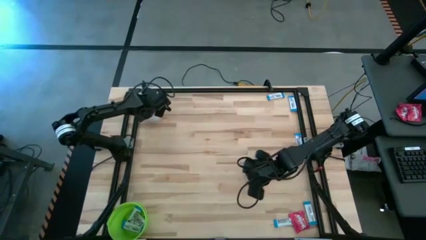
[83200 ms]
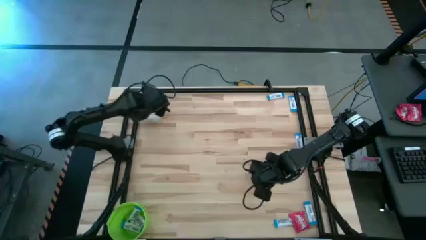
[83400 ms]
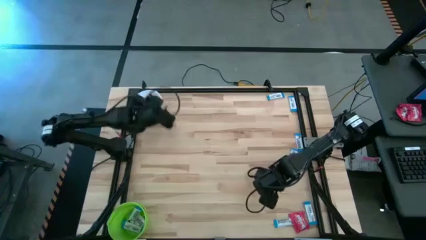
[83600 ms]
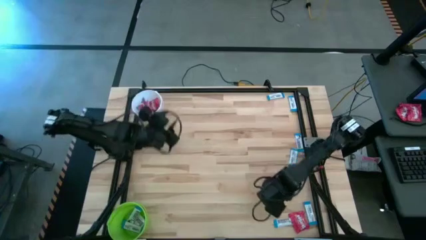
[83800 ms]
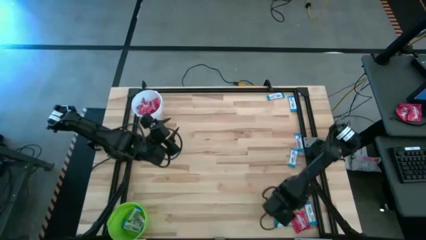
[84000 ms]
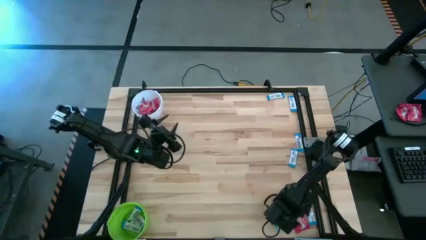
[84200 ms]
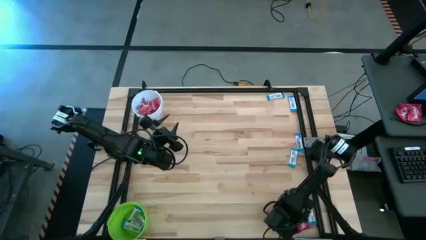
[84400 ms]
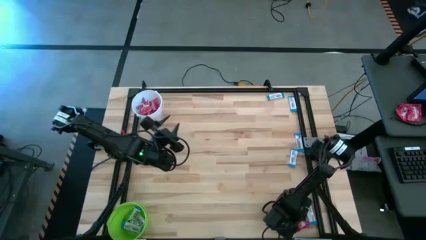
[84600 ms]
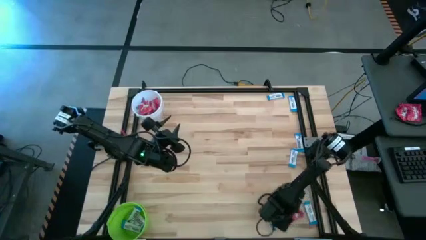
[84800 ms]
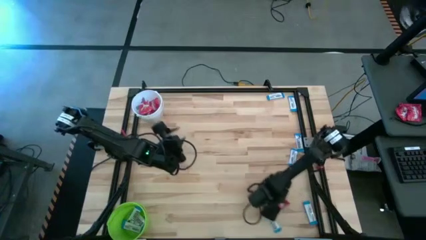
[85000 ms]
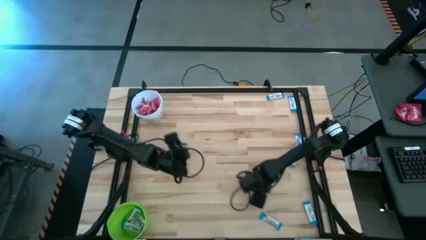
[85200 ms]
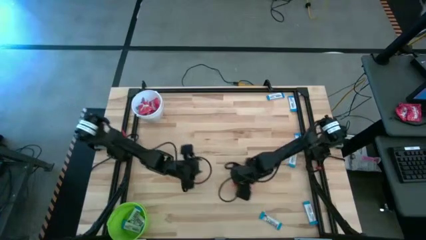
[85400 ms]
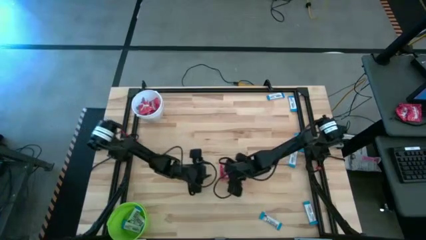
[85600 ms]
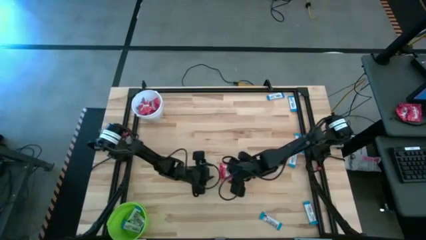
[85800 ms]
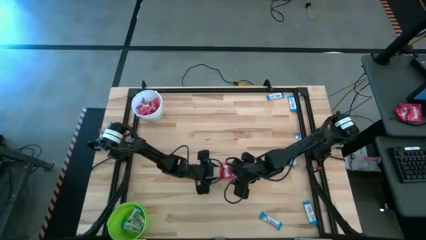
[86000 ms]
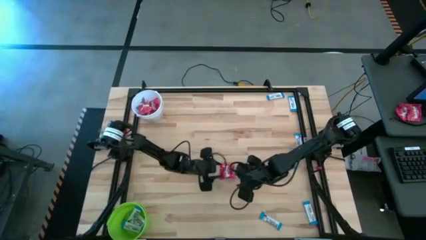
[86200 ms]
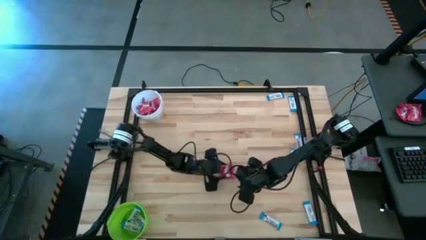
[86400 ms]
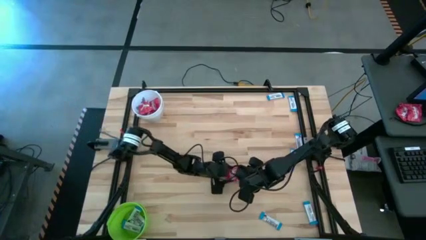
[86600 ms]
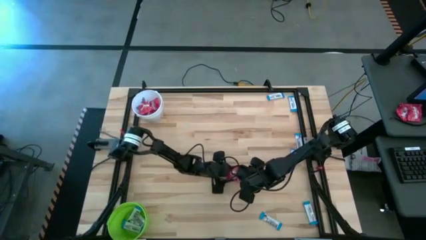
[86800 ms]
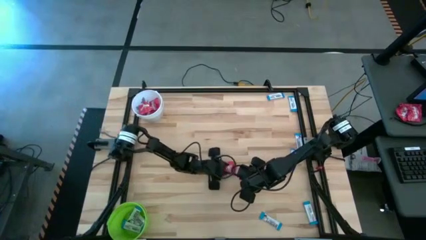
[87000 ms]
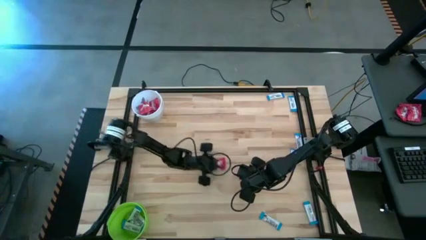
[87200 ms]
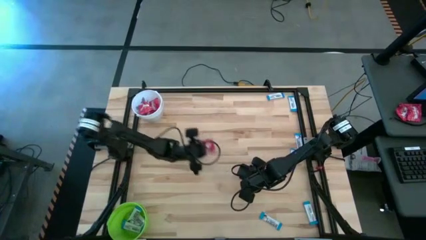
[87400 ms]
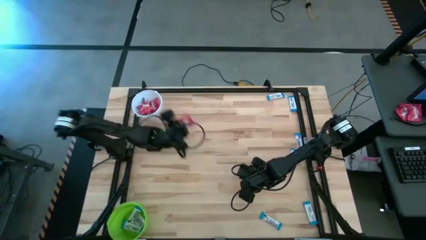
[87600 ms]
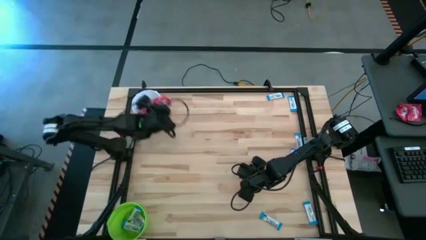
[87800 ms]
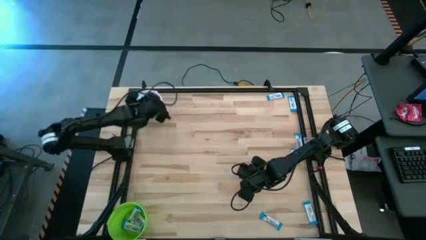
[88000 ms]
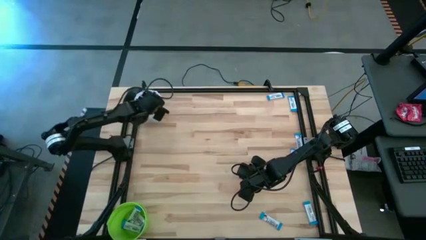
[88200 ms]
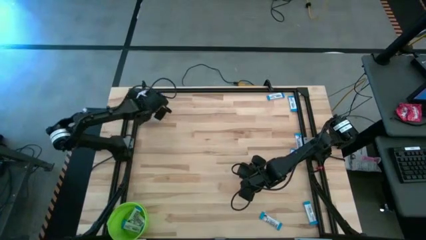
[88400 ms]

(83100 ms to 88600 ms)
Task: Sort candy by brand, put in halloween buckets
Put the red candy into the white bucket

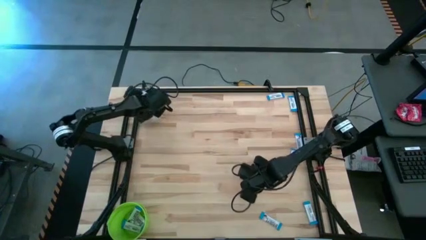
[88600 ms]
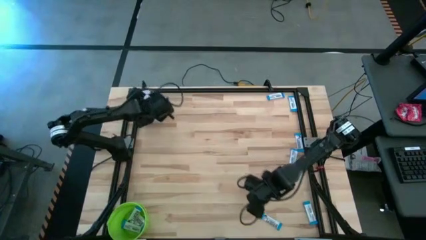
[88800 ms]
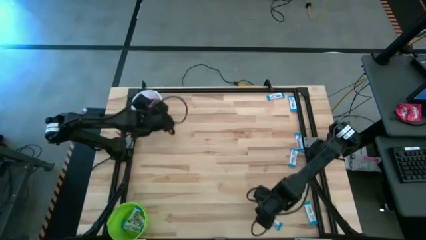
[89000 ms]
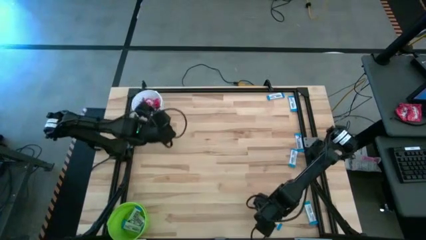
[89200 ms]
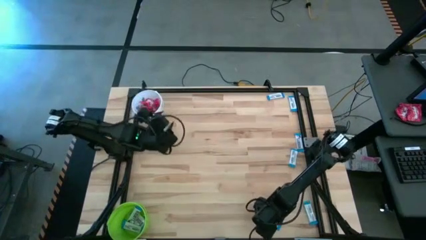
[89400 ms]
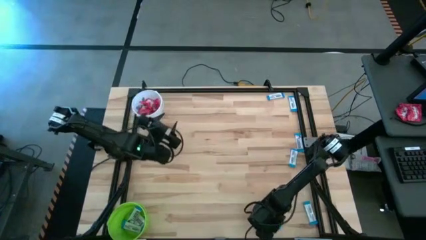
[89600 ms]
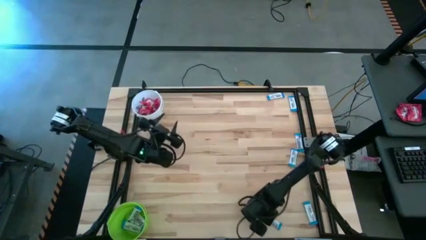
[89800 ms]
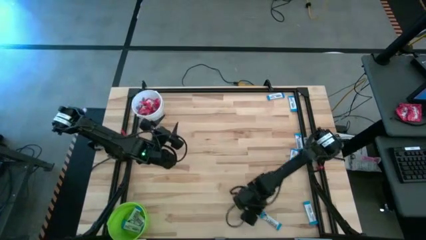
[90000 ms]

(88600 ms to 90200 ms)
Move the blue chocolate bar to the center of the table

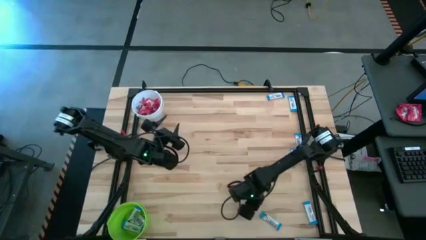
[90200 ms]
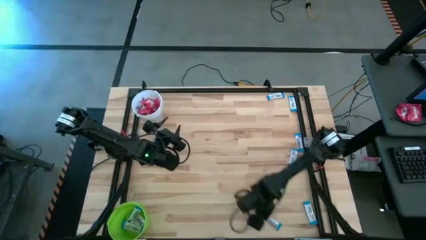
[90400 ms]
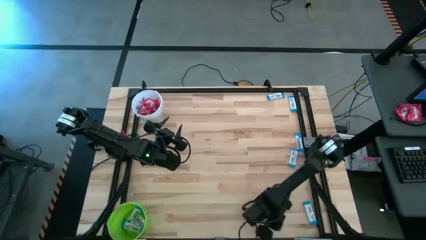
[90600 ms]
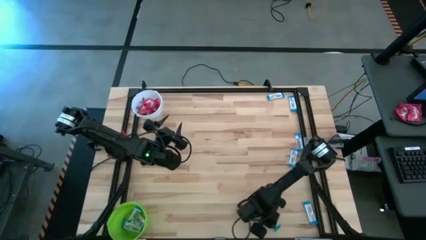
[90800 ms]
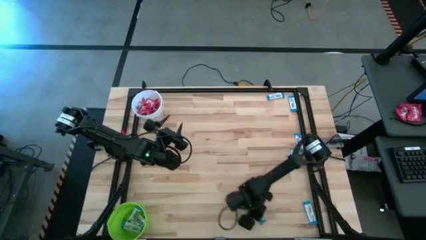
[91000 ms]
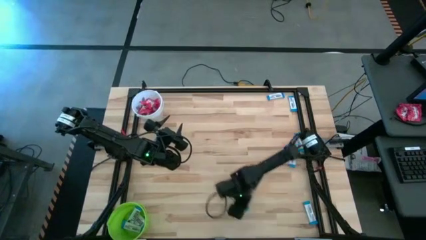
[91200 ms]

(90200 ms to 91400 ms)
Move the blue chocolate bar to the center of the table

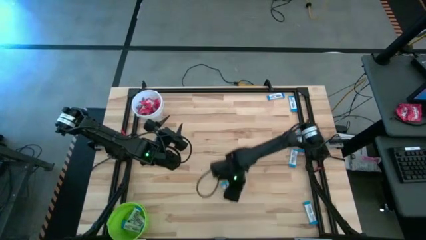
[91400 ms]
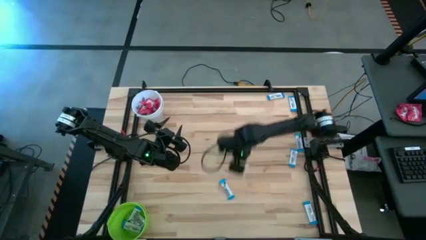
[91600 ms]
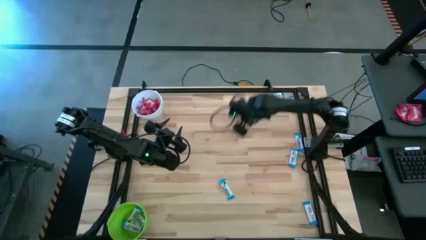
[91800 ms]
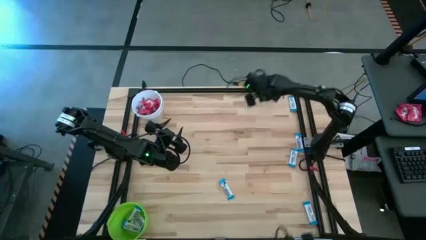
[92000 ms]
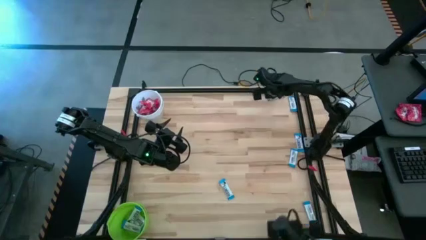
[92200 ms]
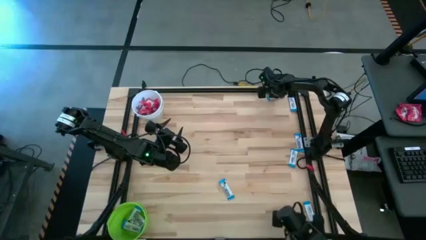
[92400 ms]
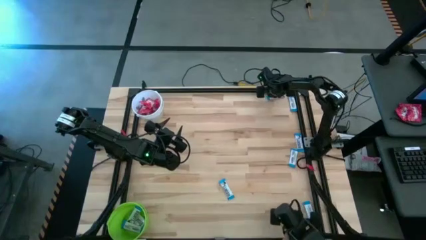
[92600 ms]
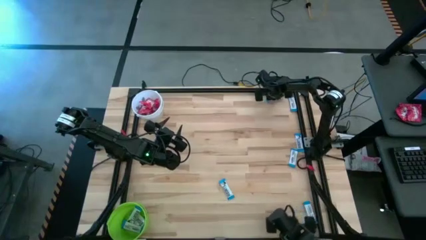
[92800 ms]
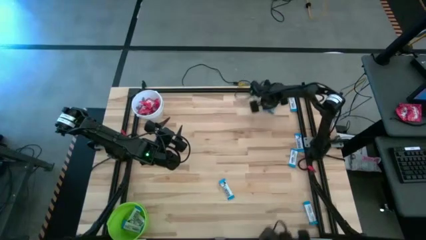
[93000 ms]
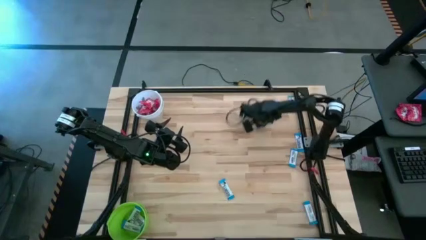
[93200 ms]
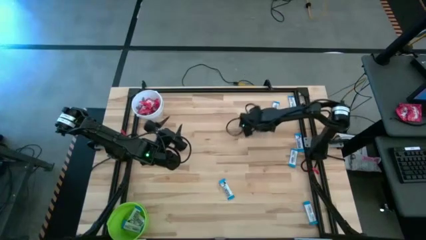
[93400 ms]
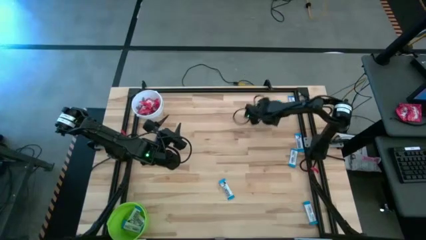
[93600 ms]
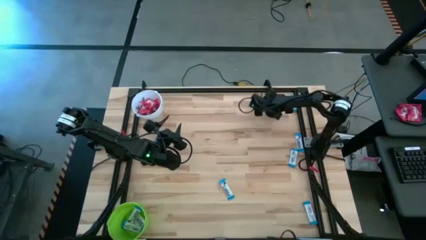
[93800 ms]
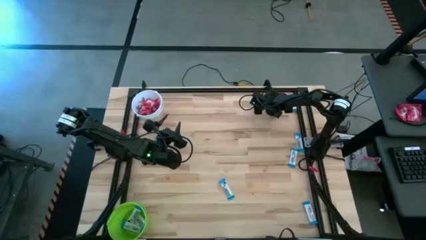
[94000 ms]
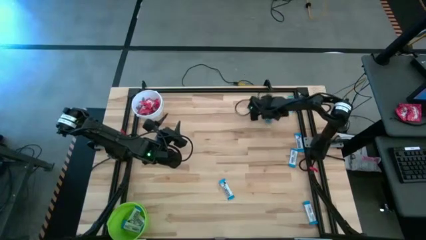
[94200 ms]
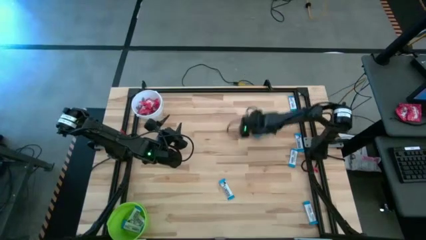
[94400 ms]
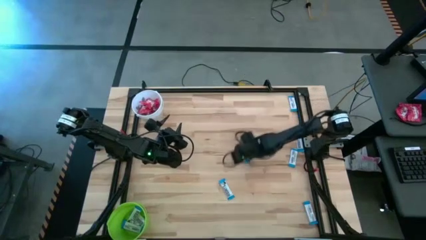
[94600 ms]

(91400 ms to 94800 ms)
Move the blue chocolate bar to the center of the table

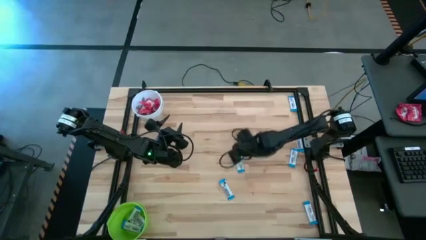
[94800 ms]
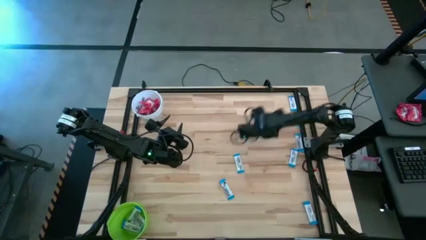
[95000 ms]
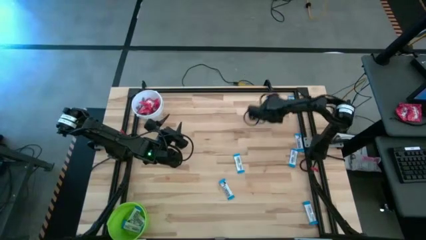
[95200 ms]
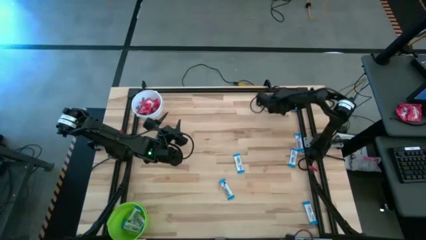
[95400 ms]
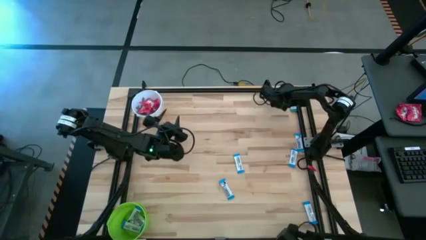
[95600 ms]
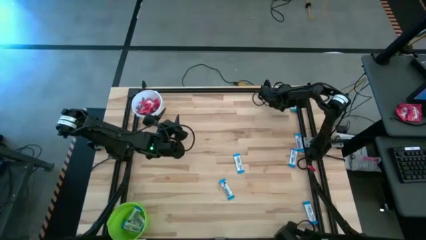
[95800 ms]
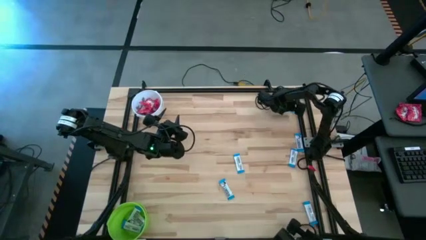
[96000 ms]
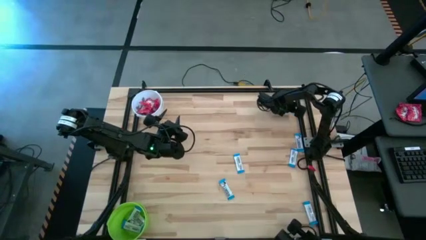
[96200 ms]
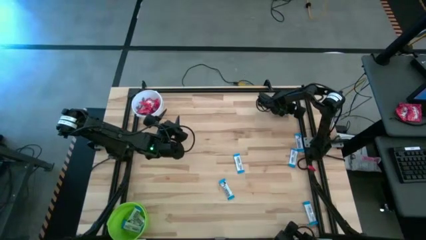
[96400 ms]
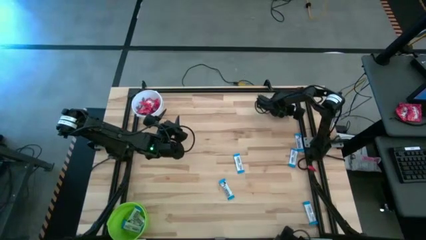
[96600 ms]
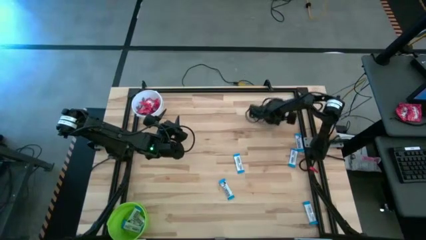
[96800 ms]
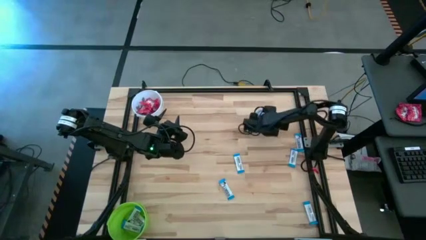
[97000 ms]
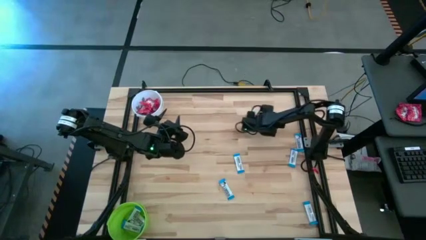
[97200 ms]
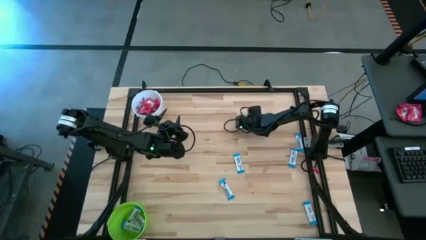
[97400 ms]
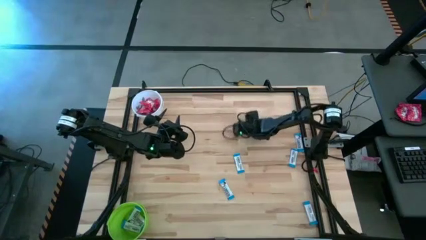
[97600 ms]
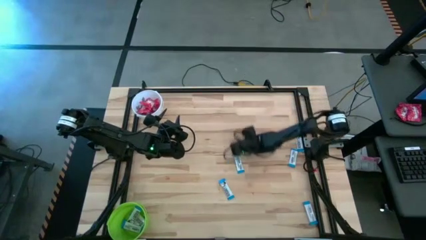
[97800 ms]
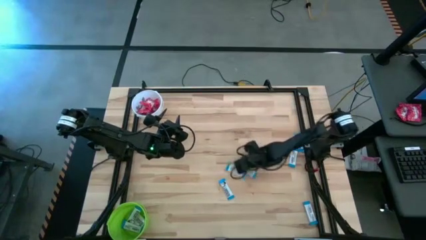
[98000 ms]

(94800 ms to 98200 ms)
Move the blue chocolate bar to the center of the table

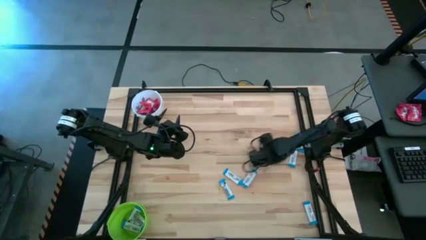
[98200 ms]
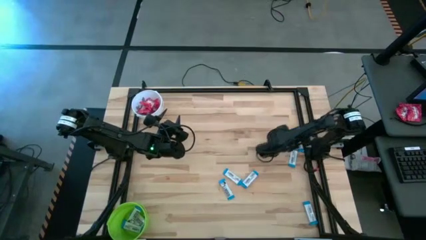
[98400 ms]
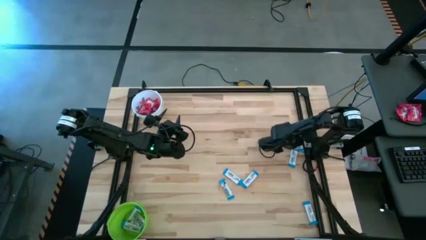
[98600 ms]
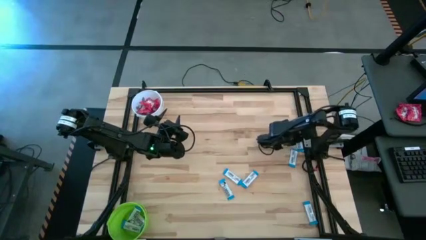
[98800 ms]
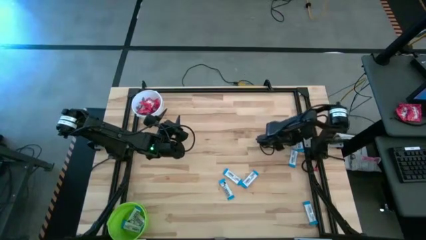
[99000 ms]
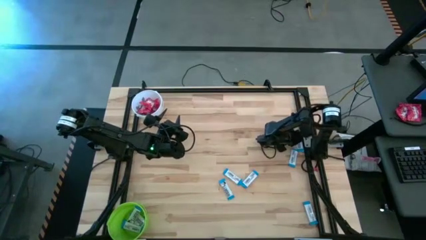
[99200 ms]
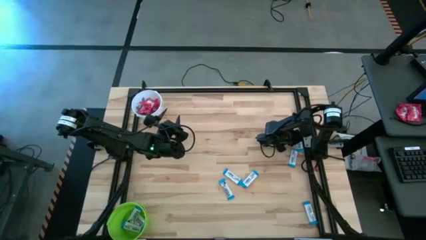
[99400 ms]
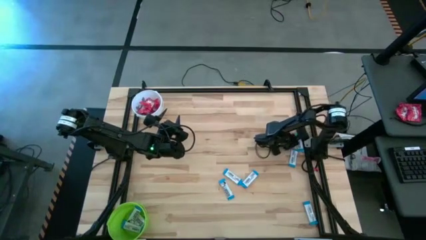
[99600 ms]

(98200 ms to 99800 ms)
Move the blue chocolate bar to the center of the table
